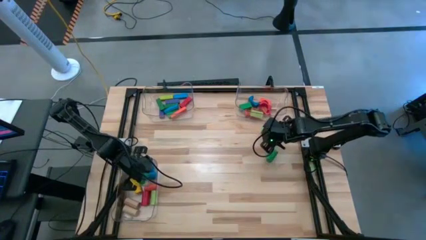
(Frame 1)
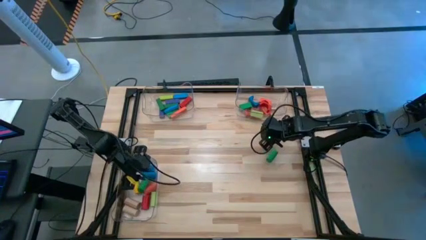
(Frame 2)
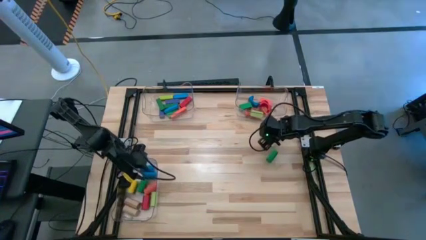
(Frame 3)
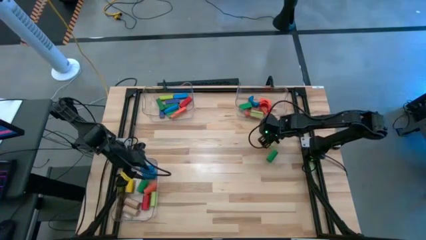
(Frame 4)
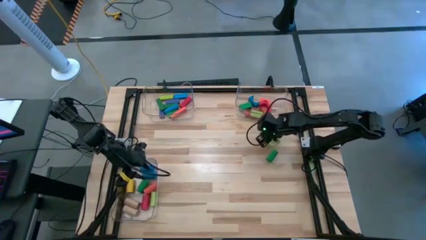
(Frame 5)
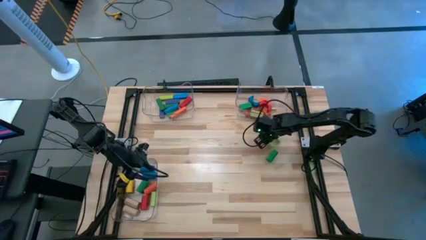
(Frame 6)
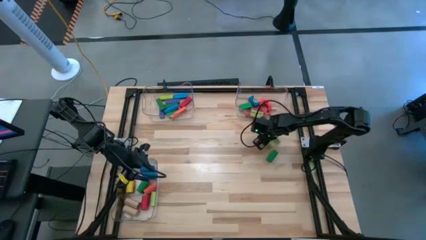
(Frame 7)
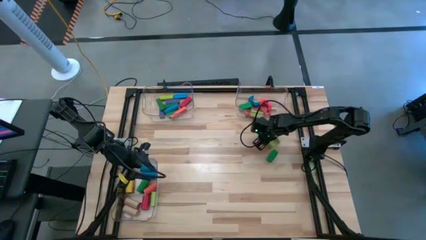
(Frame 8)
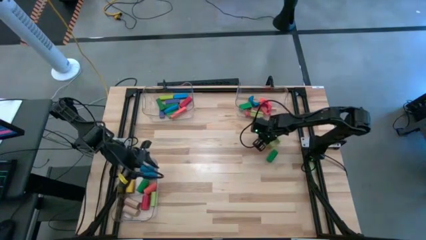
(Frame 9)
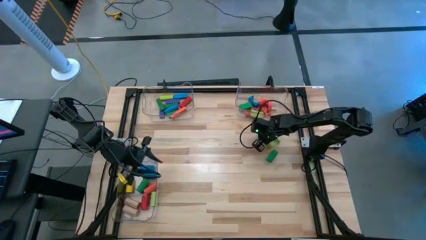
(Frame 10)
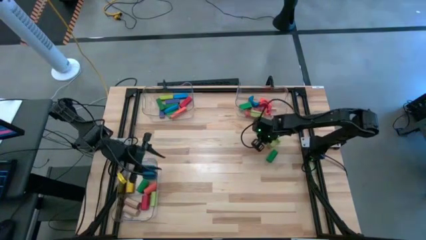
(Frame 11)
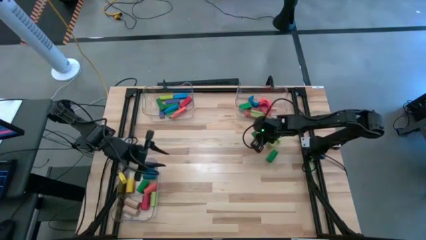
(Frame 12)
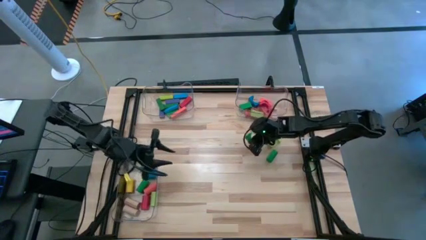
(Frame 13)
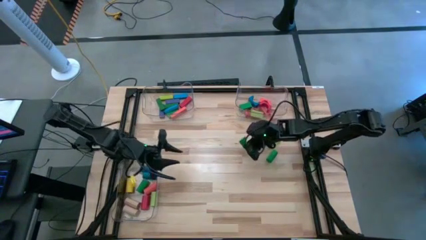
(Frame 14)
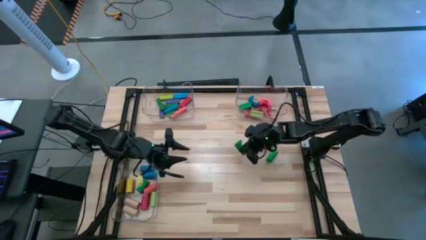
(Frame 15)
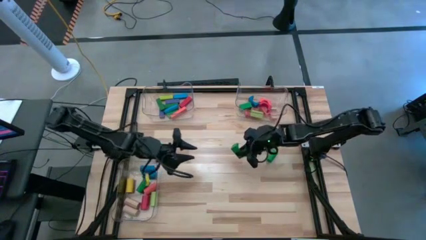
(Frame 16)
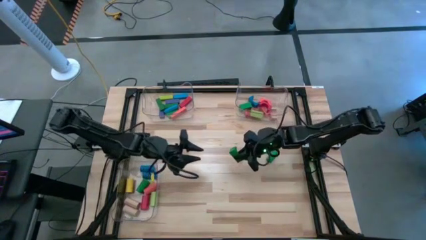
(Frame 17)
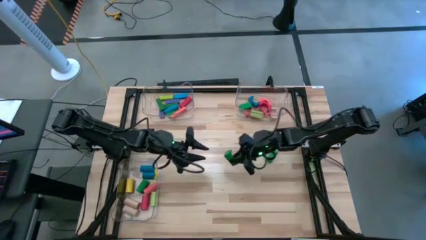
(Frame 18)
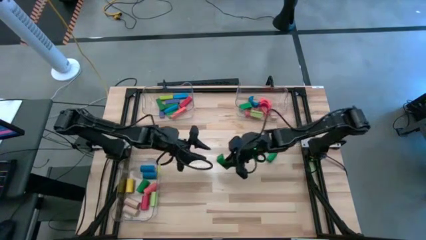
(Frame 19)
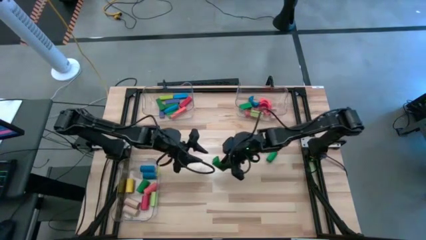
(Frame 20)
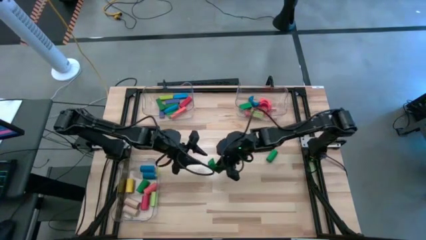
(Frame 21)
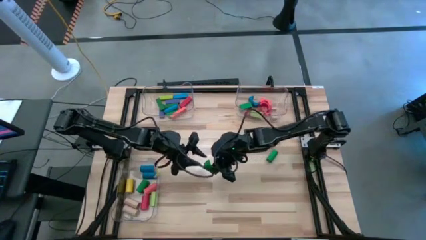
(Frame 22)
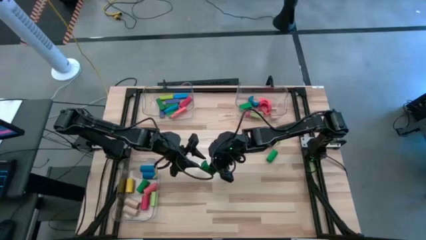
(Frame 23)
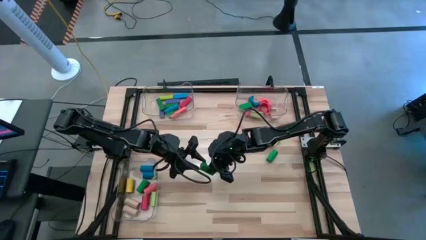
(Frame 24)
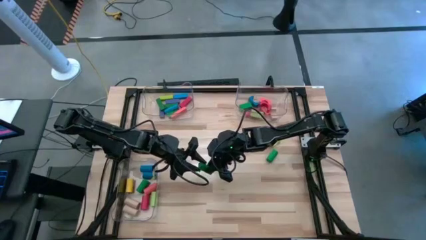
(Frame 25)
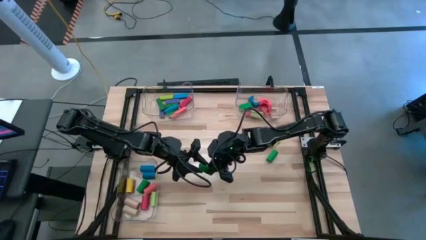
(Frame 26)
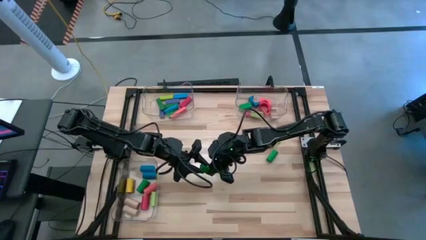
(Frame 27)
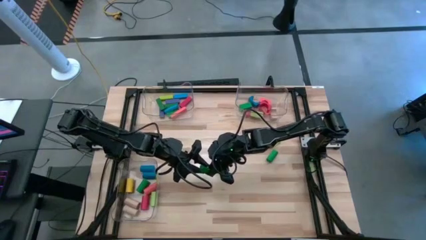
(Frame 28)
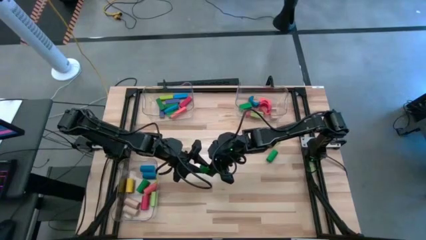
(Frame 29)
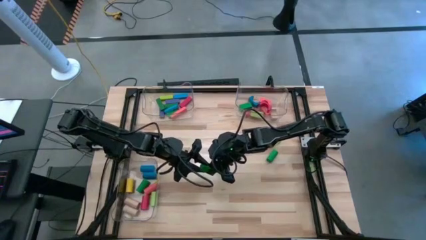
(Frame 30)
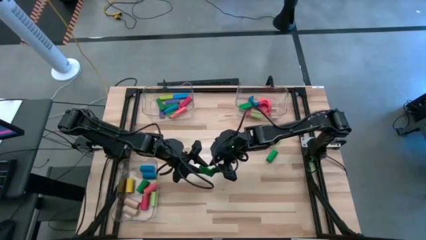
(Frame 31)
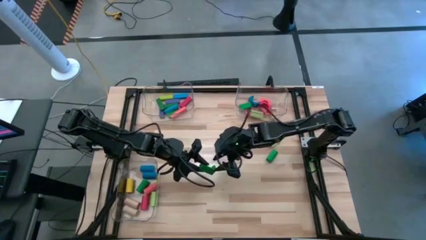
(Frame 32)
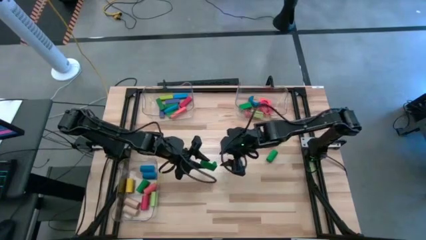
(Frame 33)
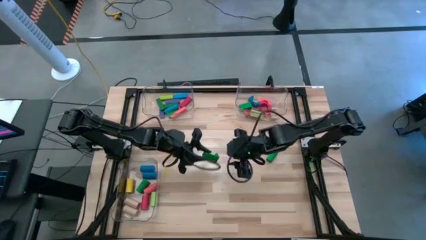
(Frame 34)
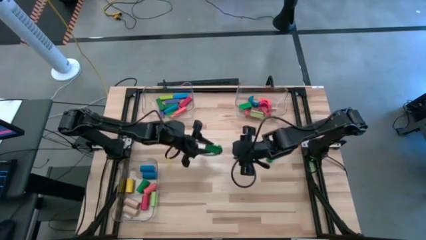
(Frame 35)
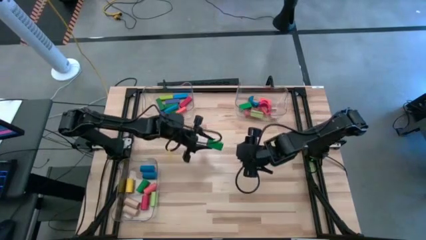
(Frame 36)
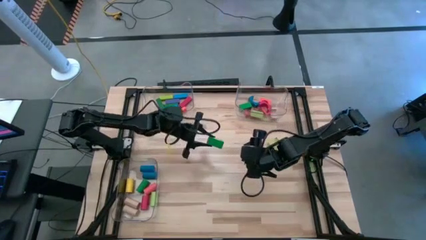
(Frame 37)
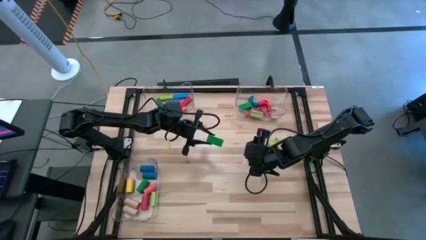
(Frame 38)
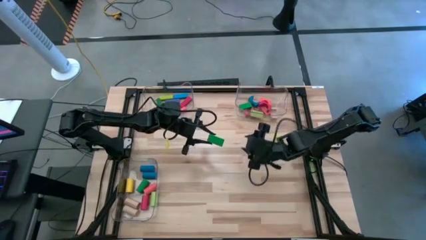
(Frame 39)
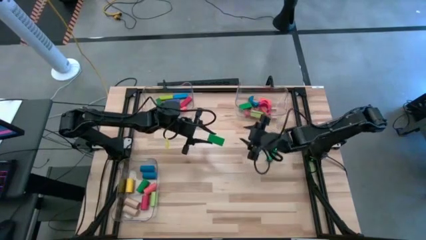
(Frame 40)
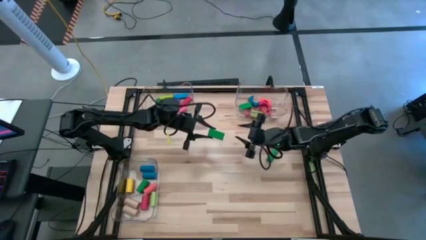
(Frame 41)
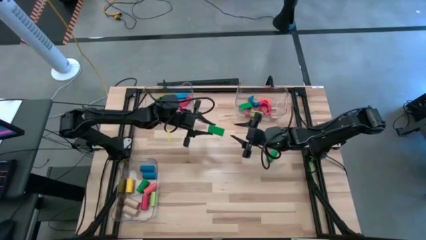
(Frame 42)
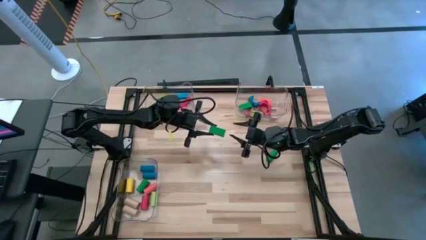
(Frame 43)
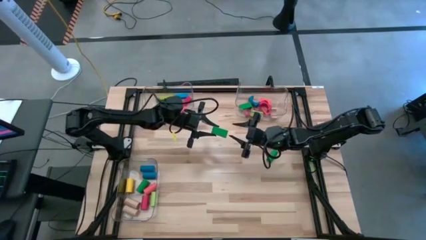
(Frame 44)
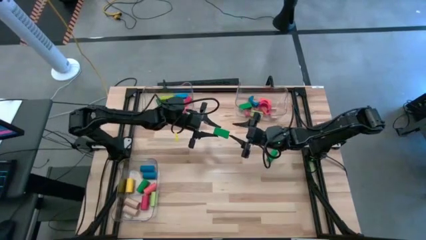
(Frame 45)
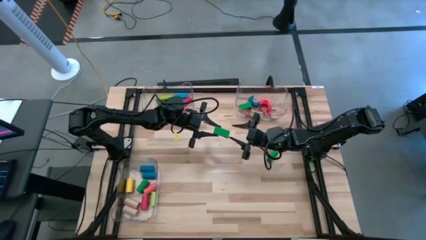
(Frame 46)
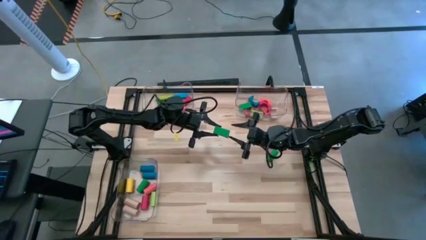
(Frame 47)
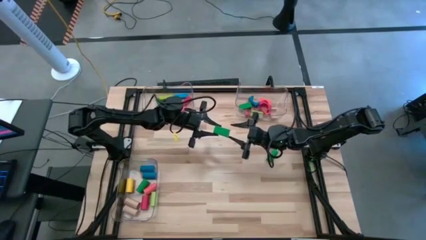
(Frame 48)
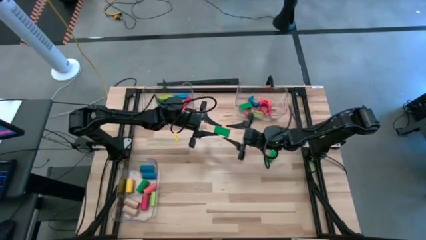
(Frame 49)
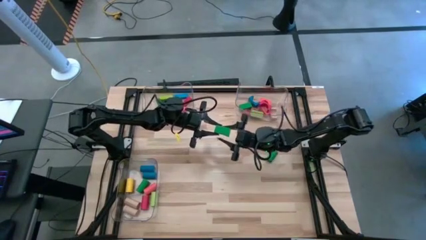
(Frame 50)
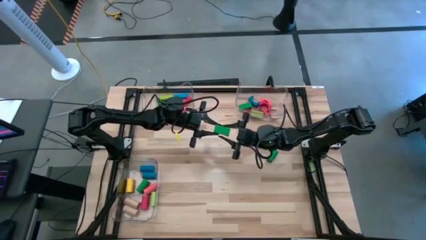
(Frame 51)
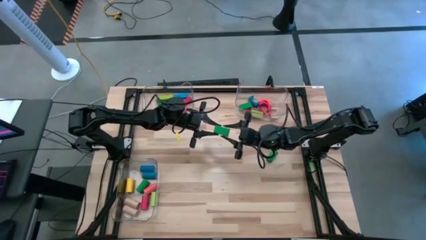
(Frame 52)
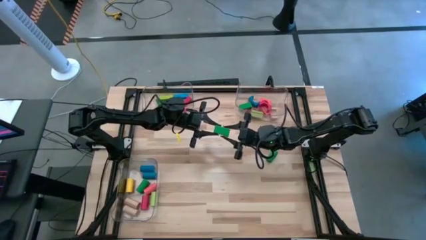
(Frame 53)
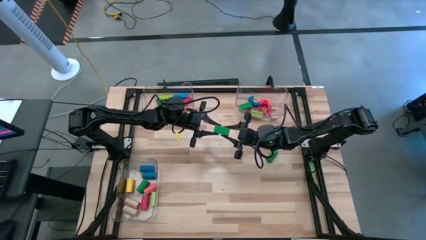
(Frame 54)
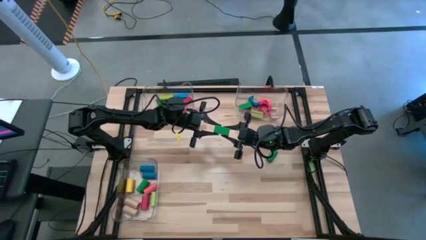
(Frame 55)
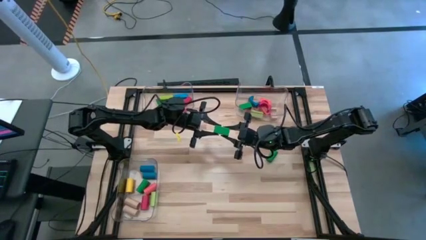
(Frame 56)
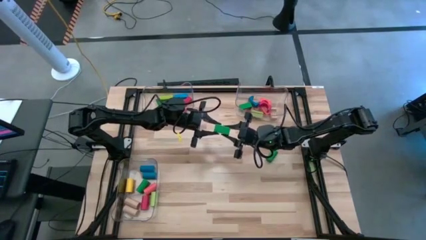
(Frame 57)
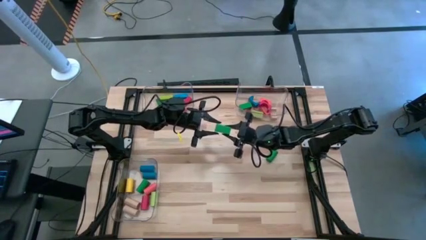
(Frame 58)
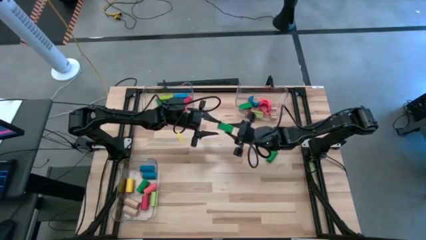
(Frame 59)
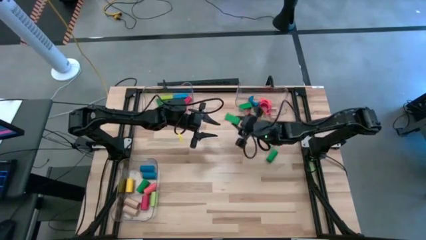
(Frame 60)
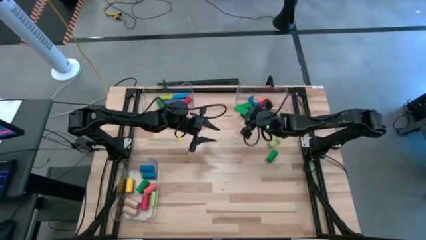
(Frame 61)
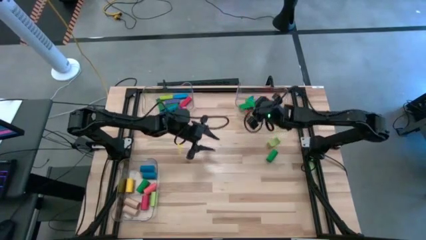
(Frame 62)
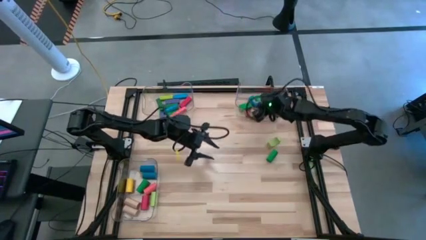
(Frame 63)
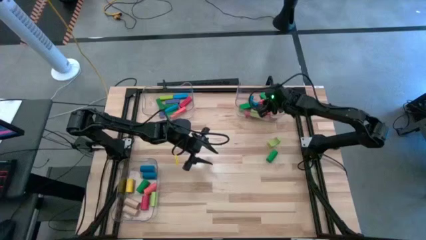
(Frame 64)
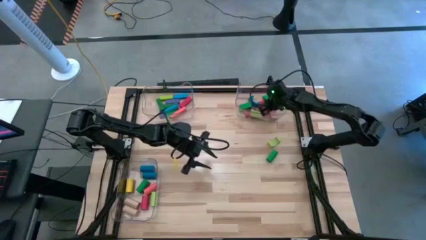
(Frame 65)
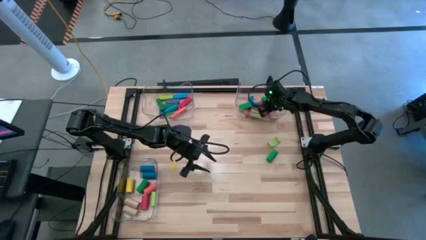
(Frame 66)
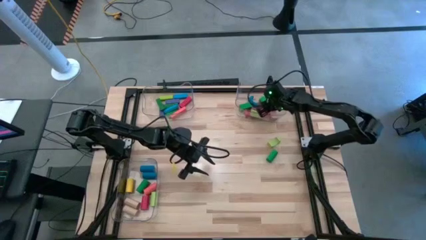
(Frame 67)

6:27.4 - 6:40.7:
Task: Sort blocks by size
Put the green arch block into the top right transparent bin

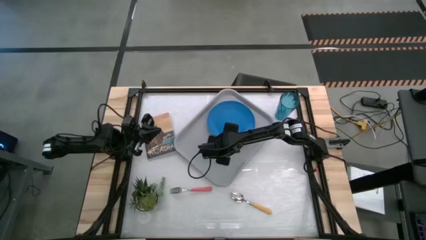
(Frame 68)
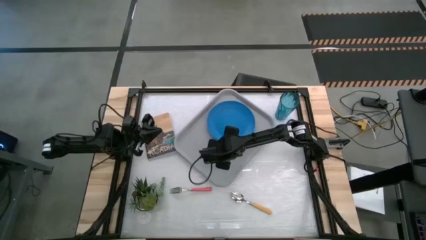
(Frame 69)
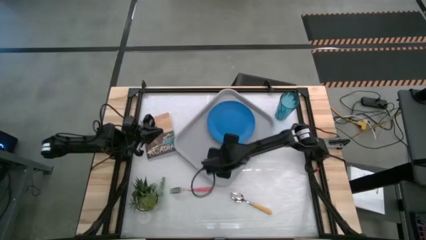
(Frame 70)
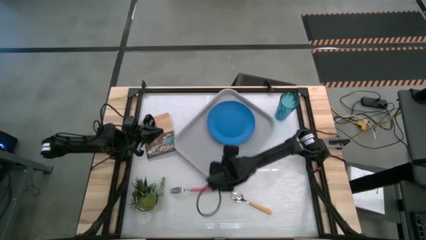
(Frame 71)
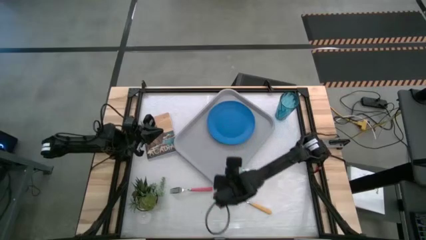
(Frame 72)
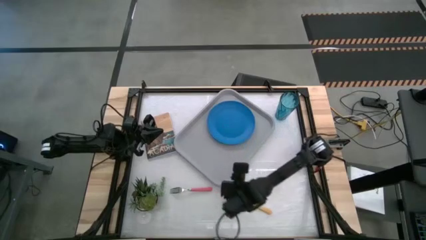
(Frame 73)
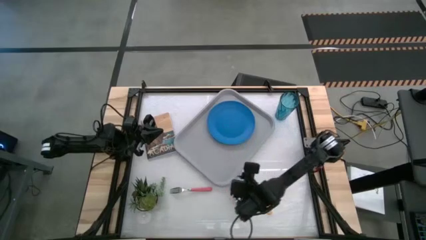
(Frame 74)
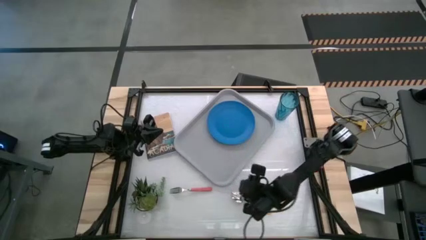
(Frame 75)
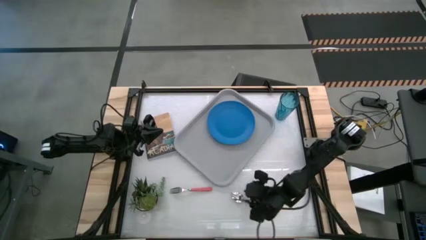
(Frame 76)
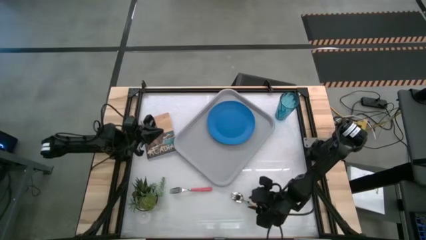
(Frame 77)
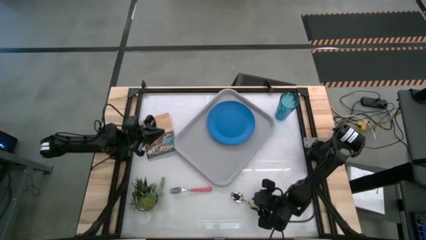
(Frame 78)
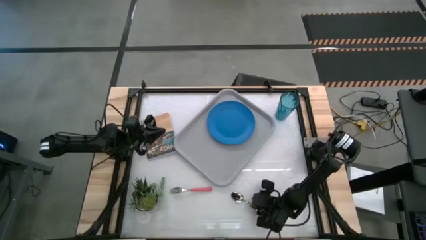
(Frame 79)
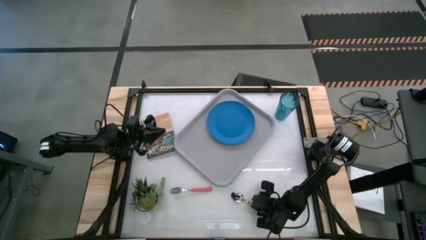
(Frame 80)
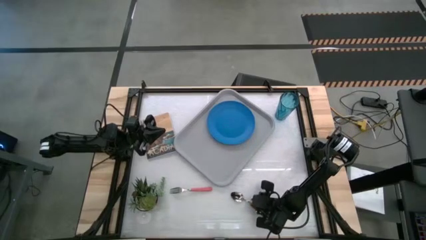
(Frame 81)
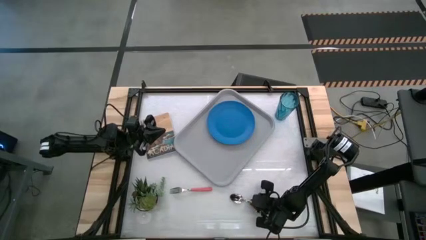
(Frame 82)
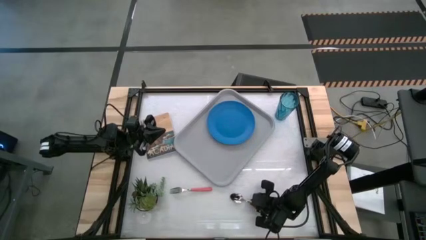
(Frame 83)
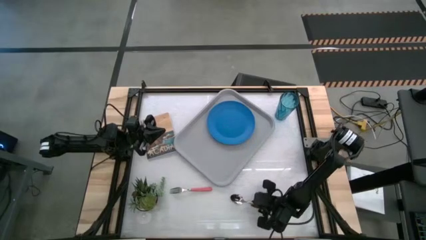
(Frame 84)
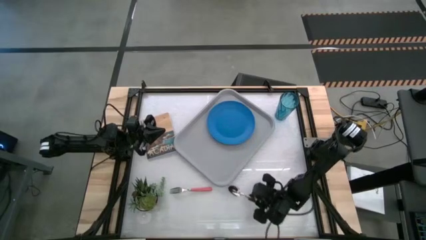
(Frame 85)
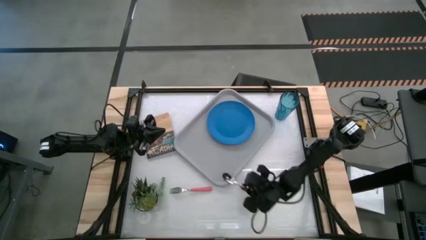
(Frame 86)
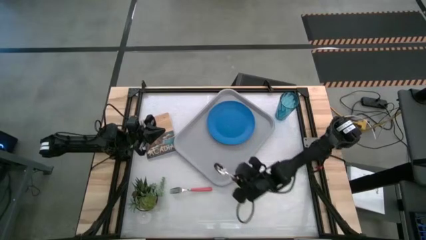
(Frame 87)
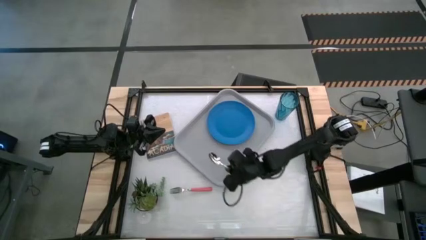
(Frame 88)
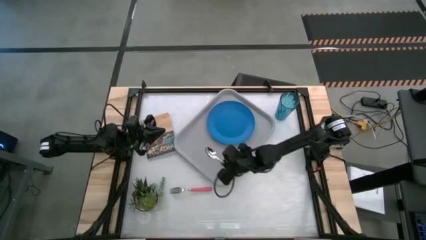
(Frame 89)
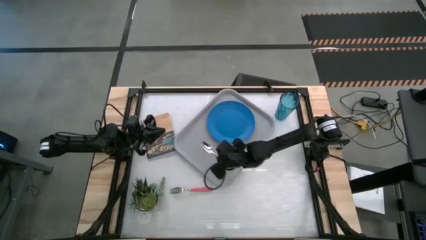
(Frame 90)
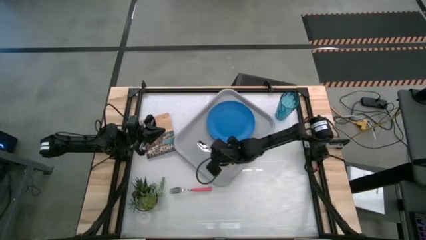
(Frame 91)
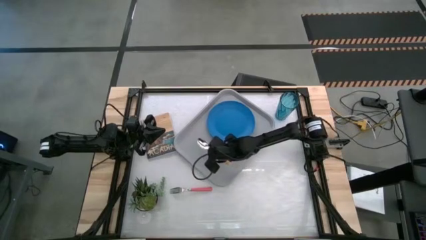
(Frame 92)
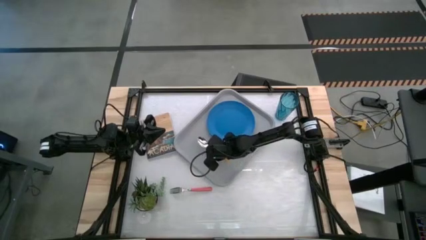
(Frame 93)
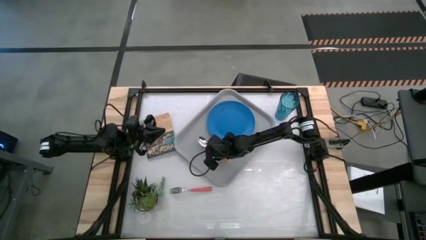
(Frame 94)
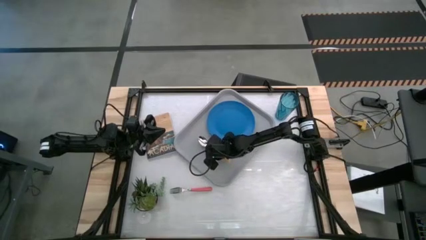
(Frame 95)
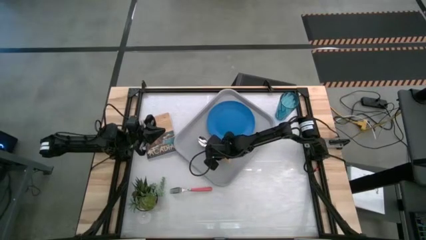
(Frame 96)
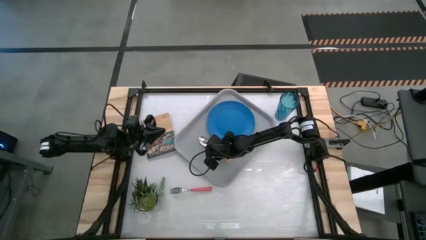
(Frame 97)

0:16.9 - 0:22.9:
Task: Pick and place plate/cup/fork/spoon on tray
Put the orange spoon on the gray serving tray to the left of the blue plate
